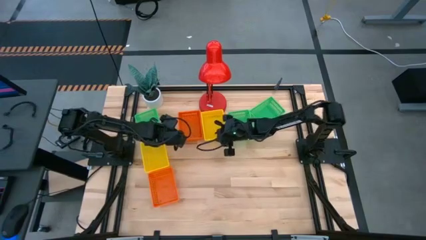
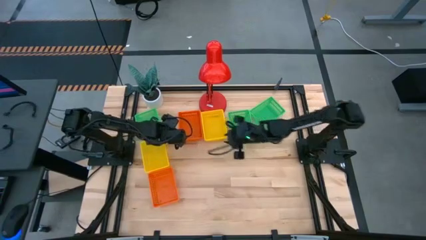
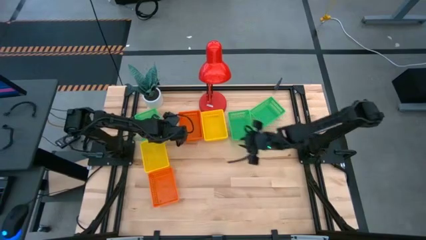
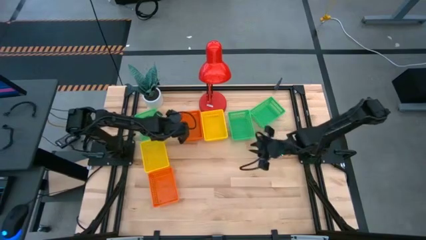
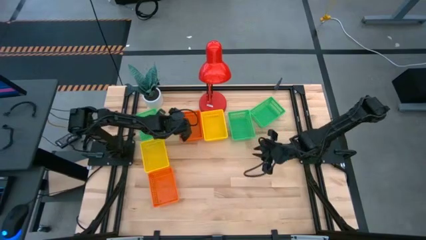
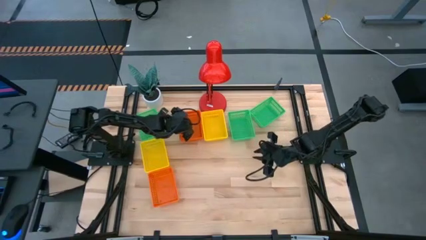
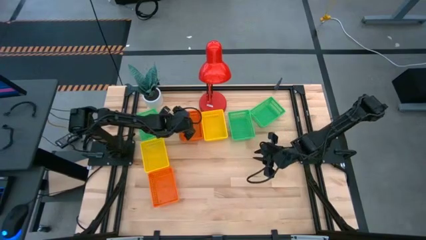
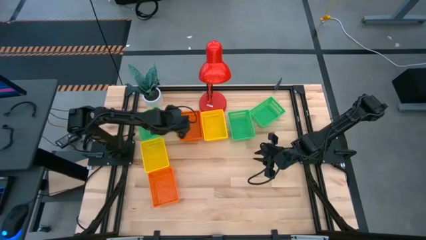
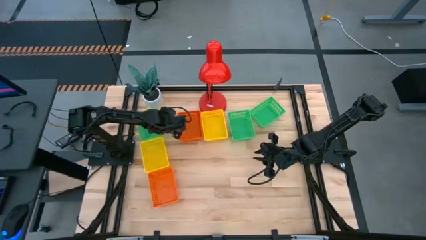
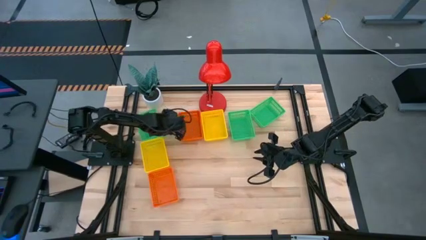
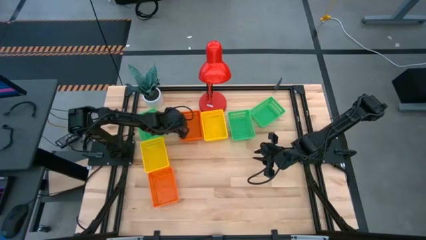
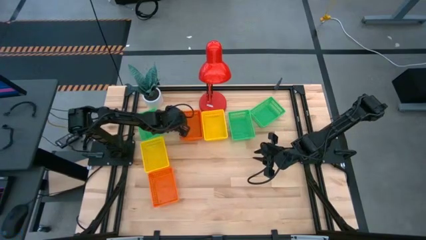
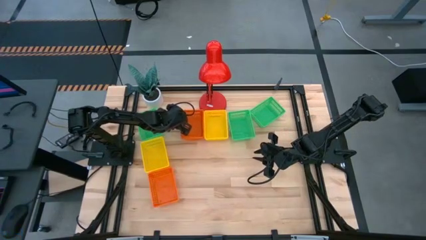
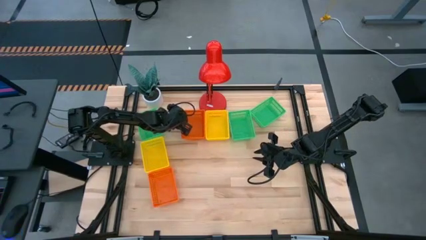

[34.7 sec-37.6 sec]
Adjust the stacked bins

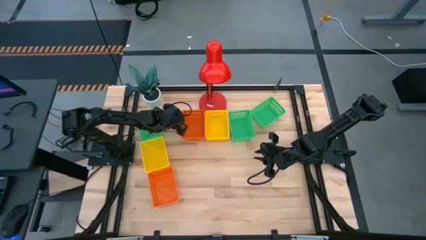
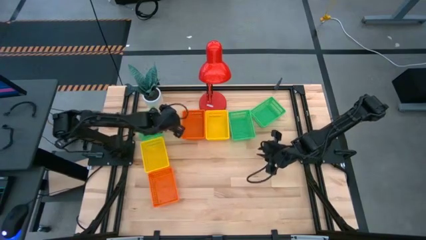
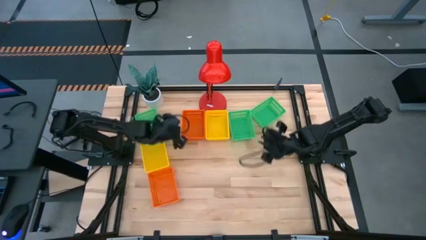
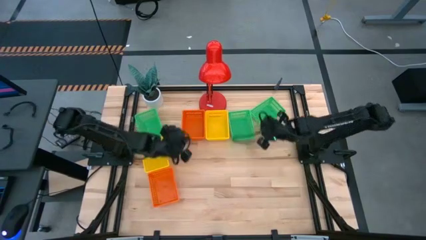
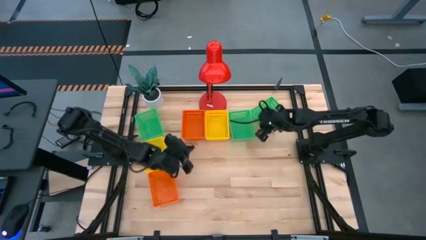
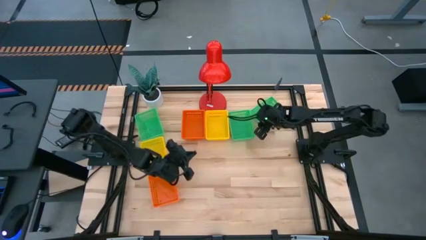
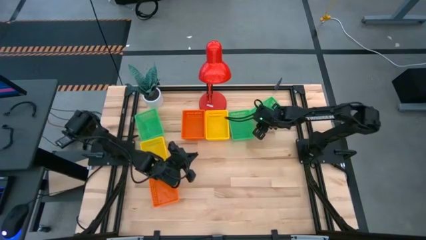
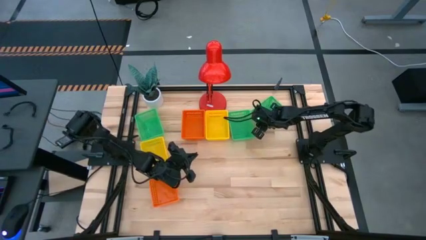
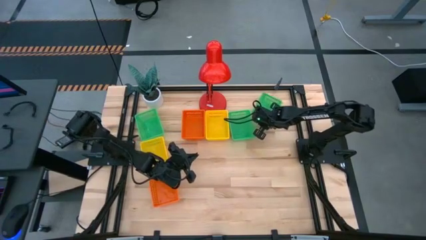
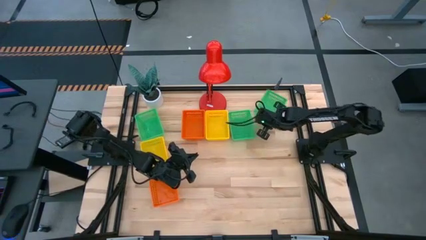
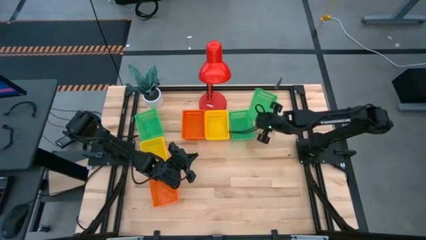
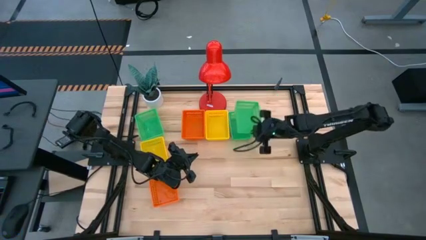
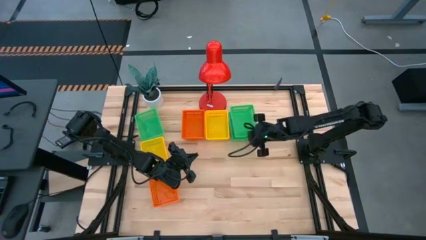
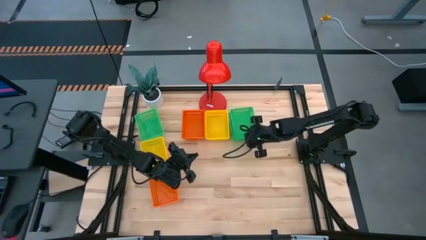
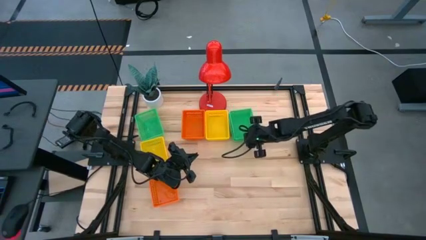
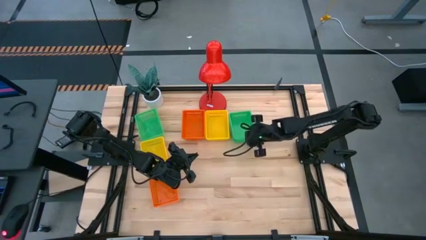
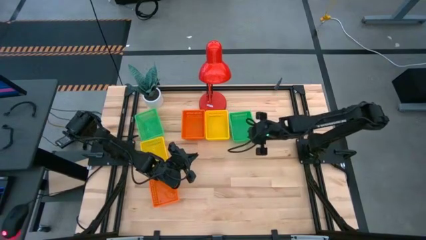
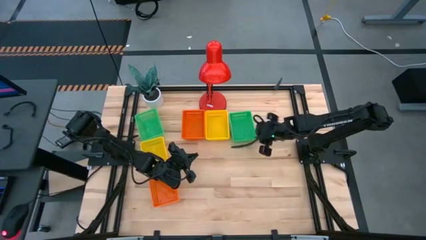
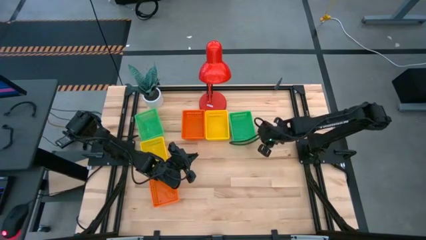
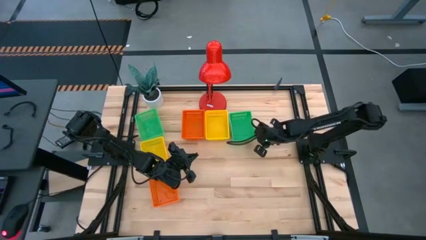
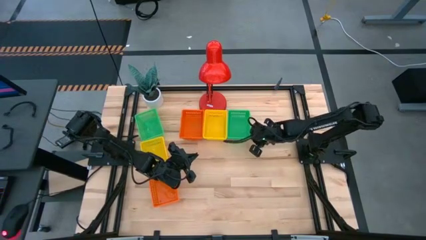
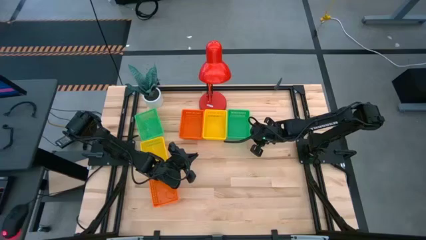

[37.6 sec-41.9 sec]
Stack the right green bin on top of the middle green bin

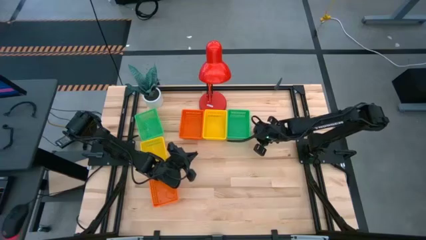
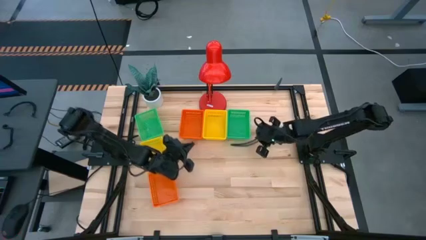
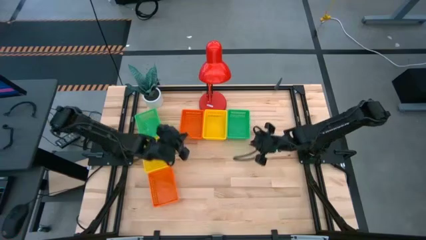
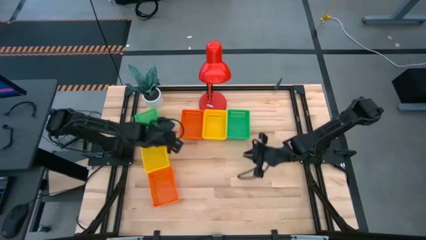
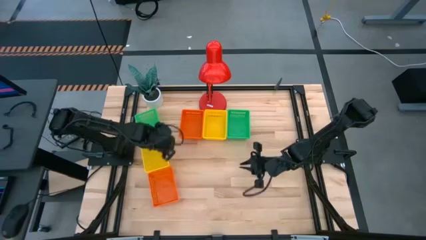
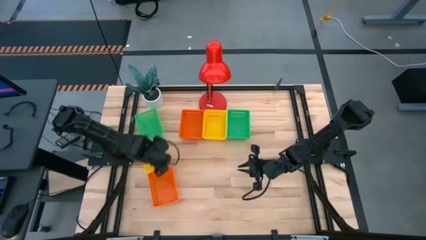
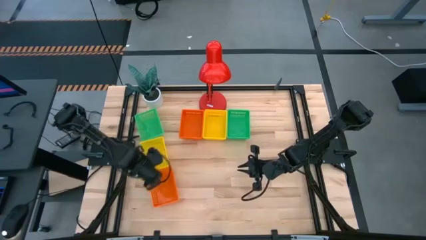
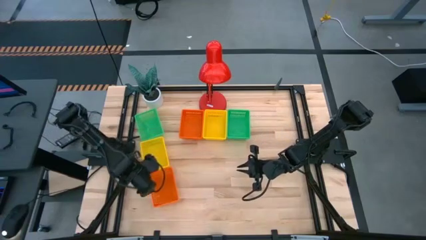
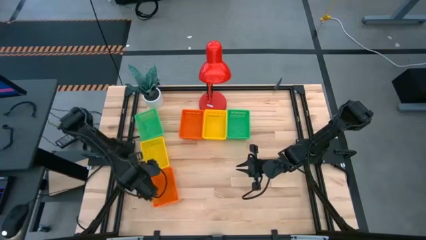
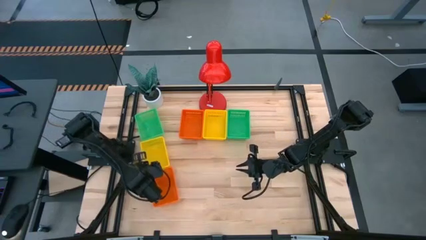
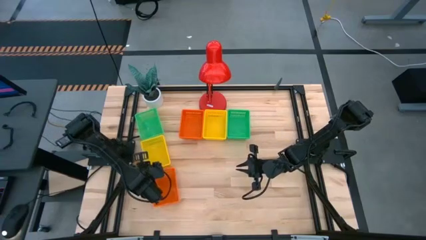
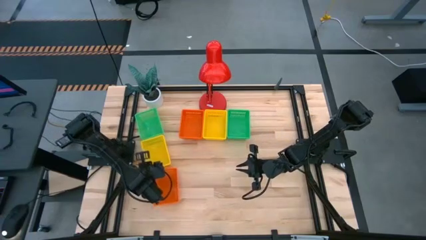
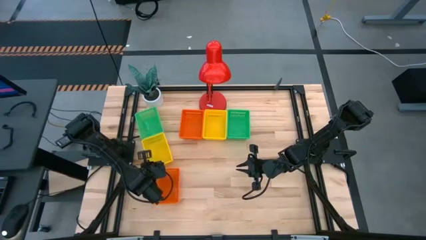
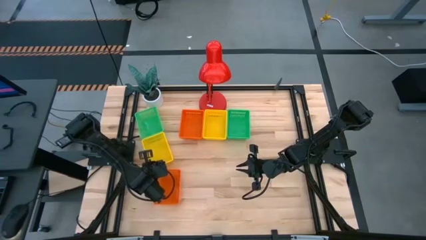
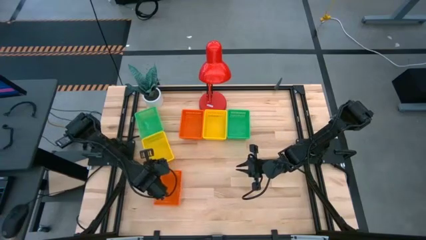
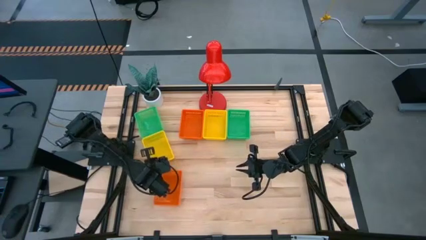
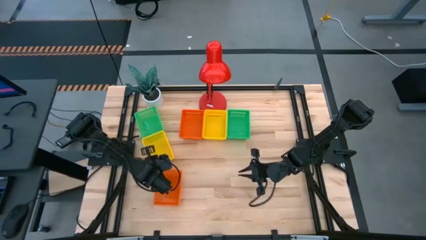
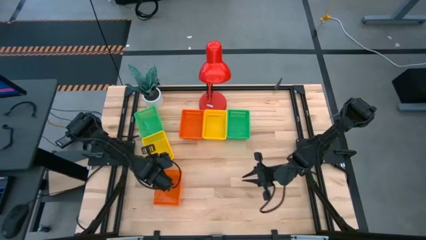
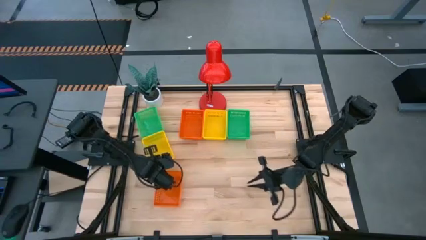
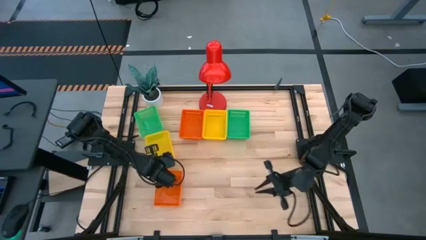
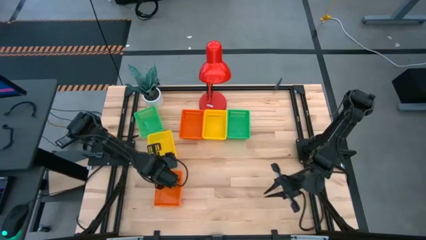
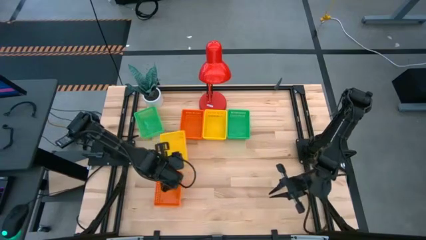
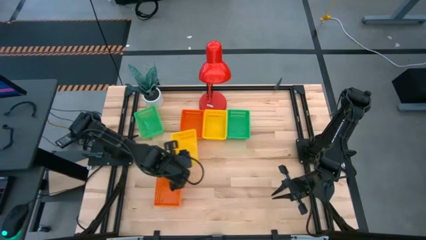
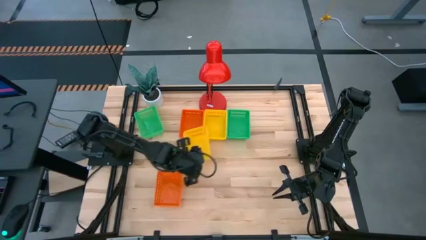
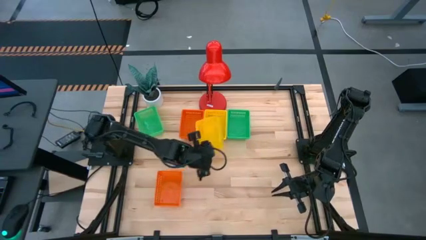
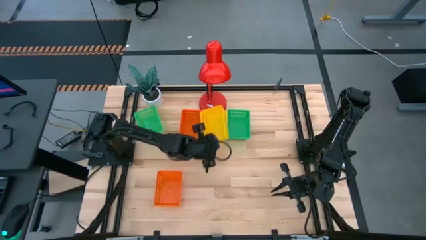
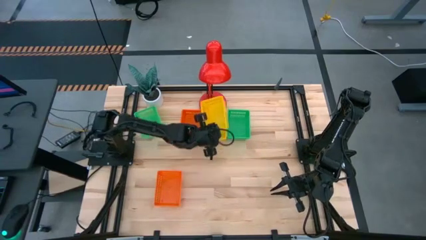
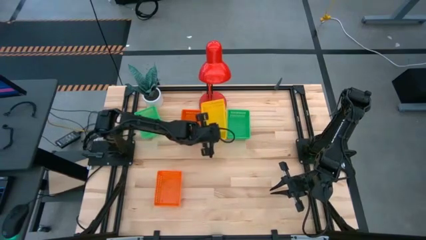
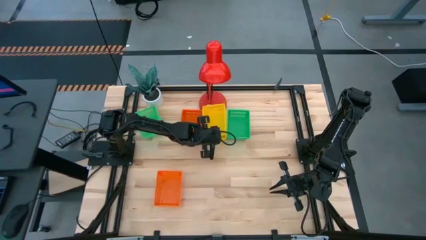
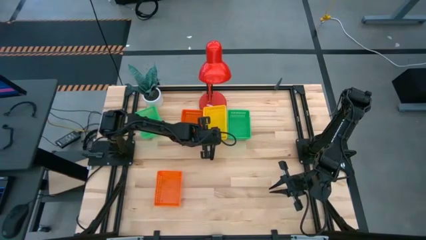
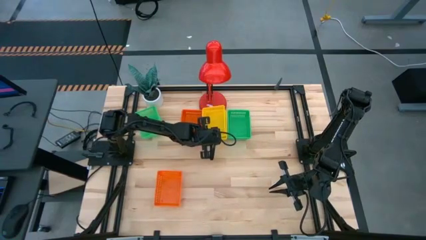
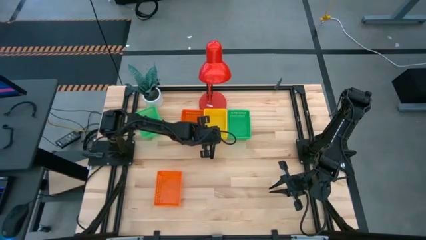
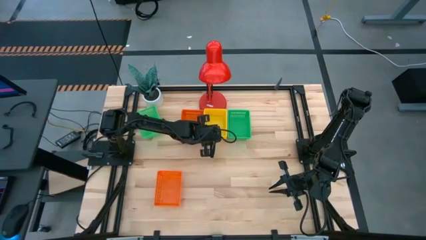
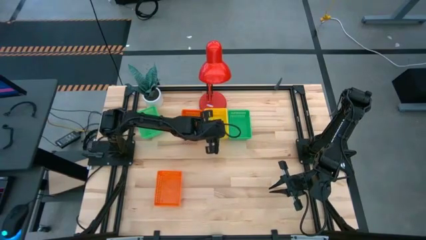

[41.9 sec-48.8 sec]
Stack the left yellow bin on top of the right yellow bin
